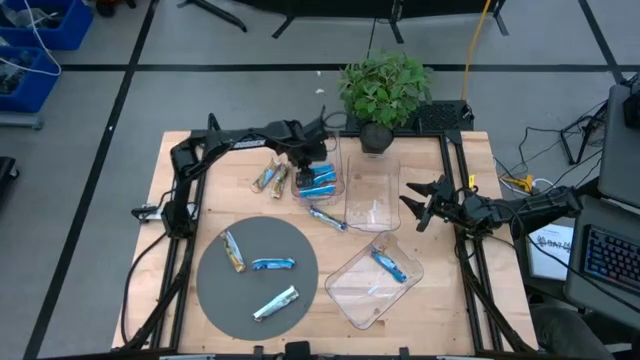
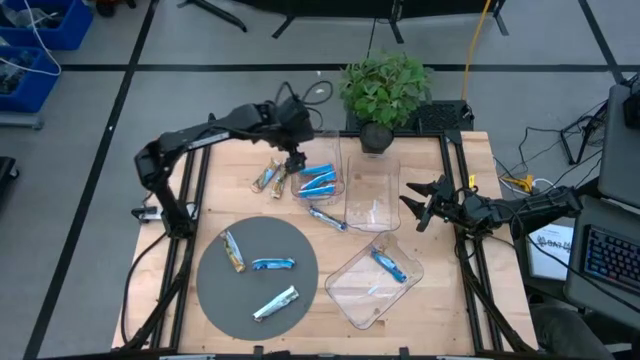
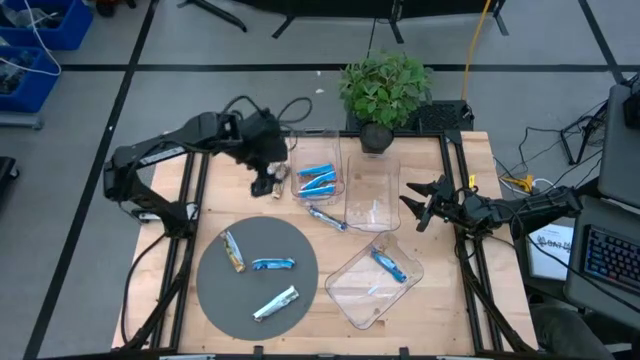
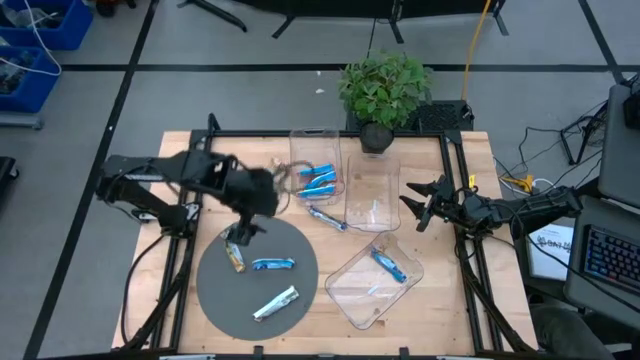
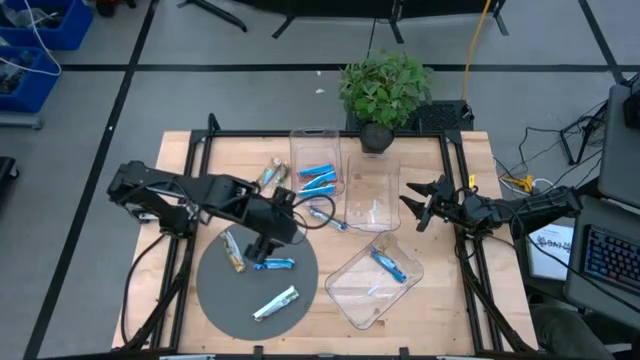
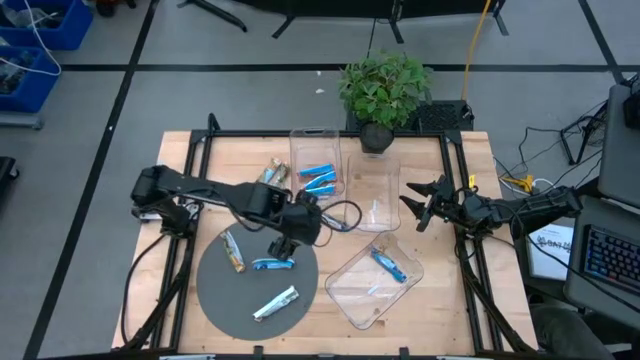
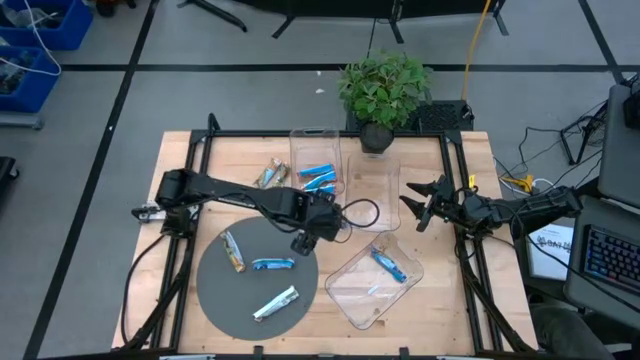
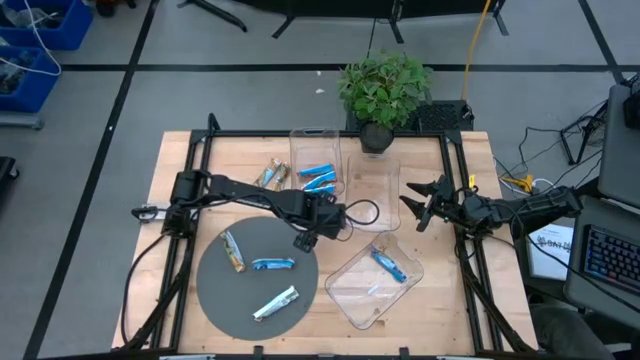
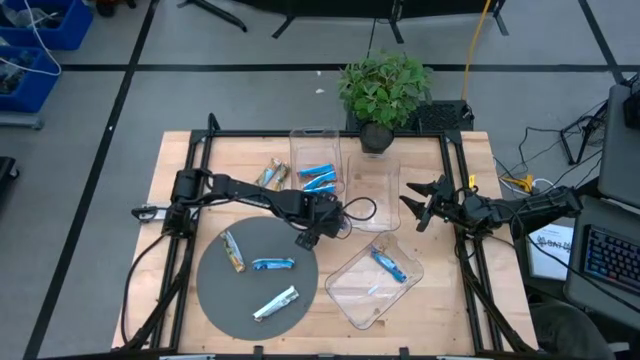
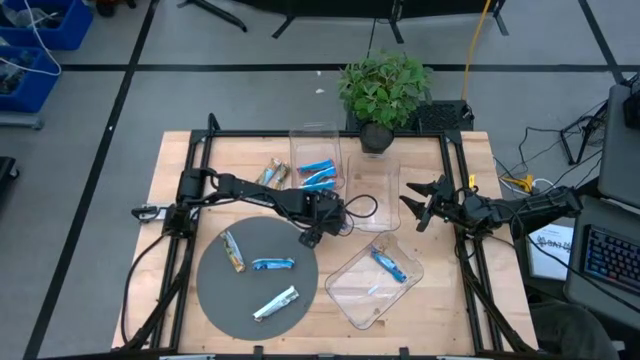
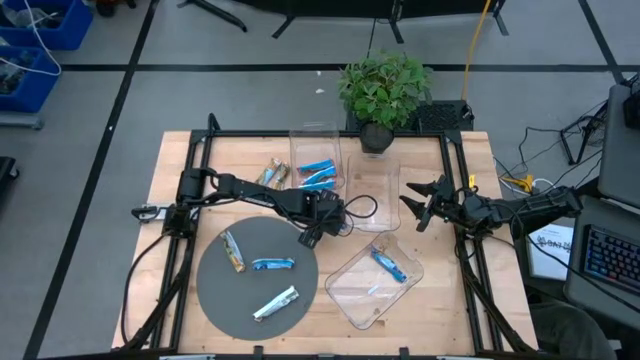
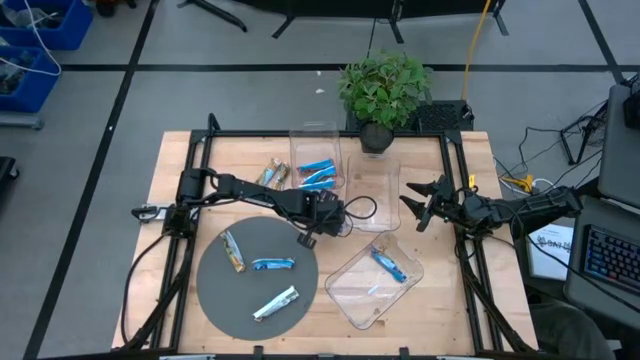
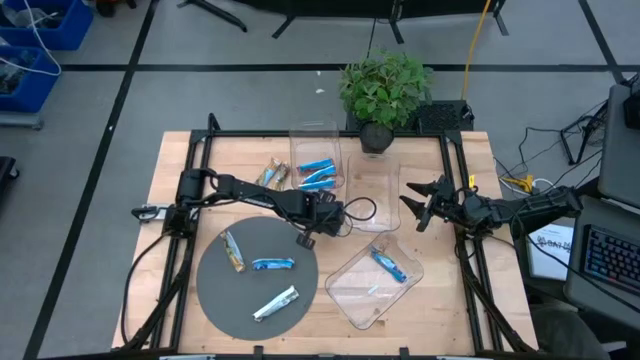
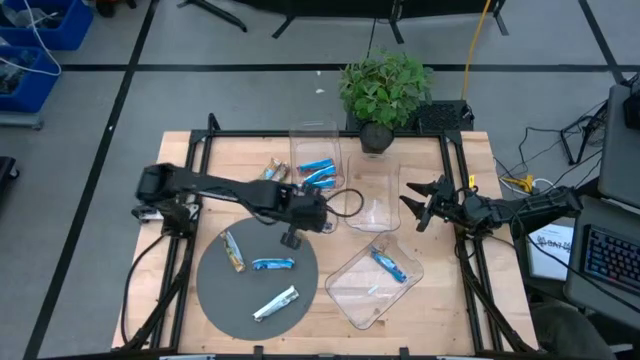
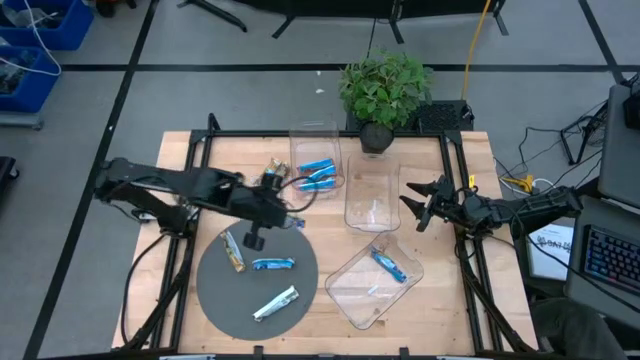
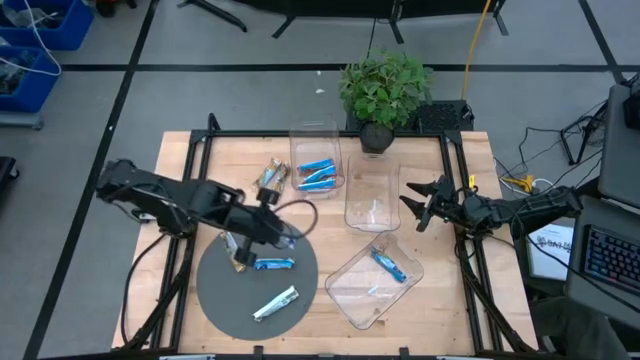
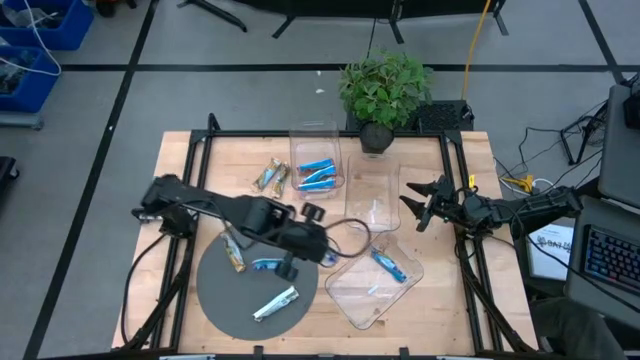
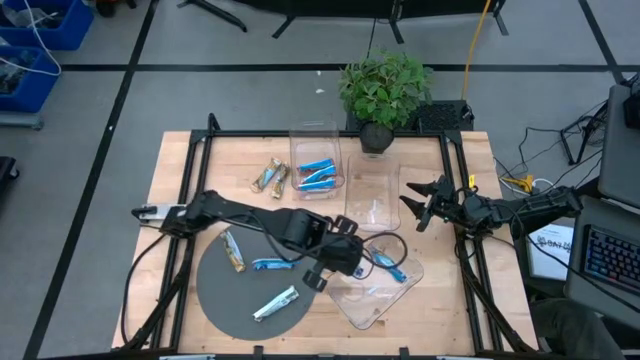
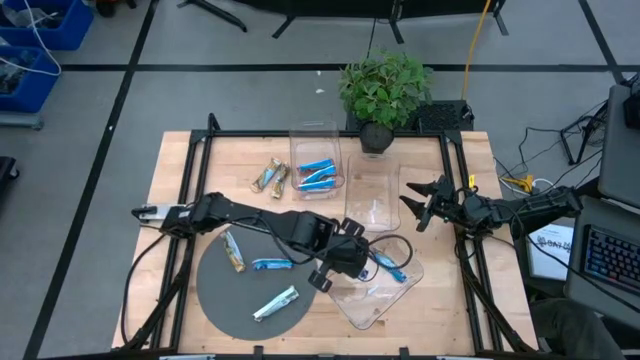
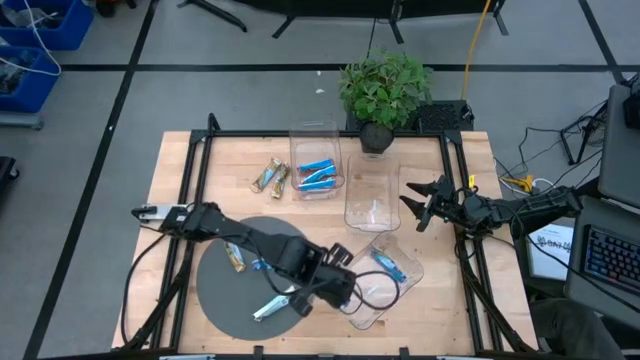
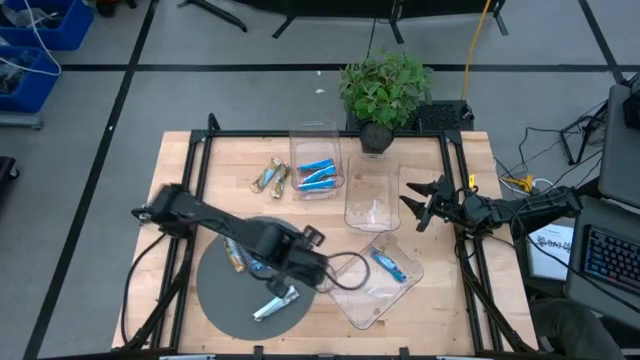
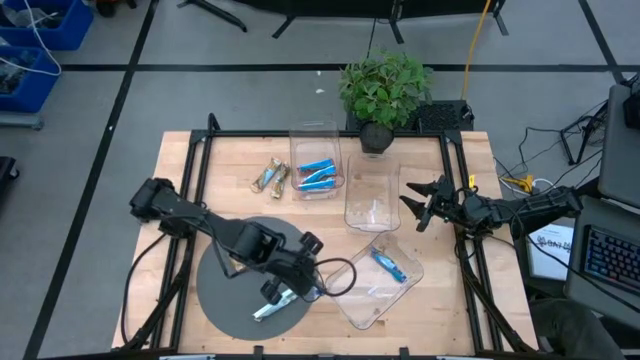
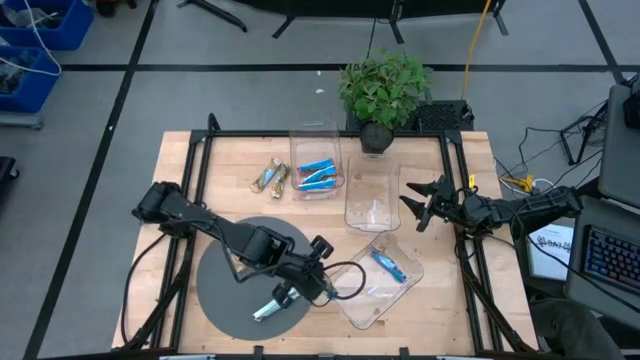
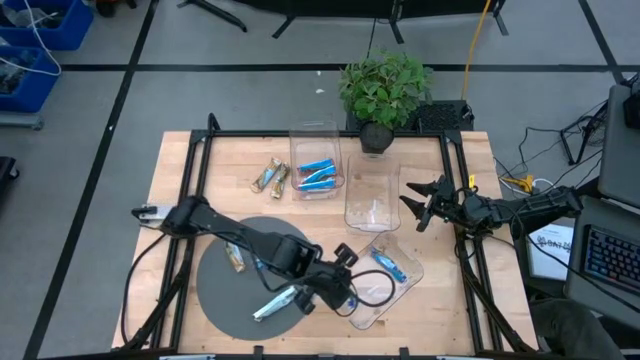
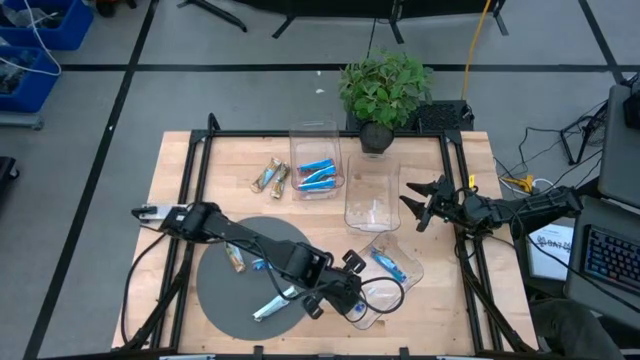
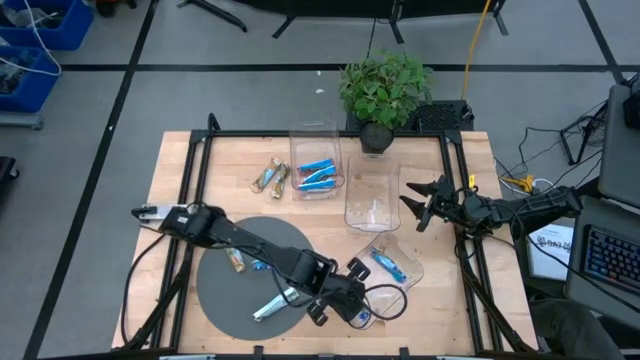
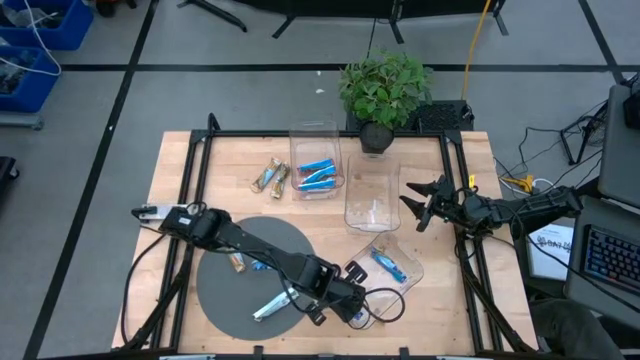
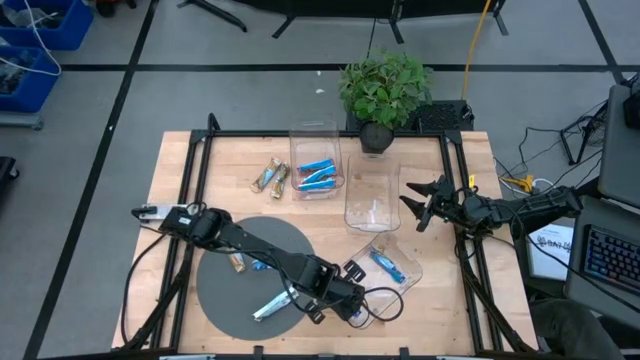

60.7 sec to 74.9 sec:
Task: Pick and place Granola Bars by type
Put the blue granola bar into the bottom transparent bin

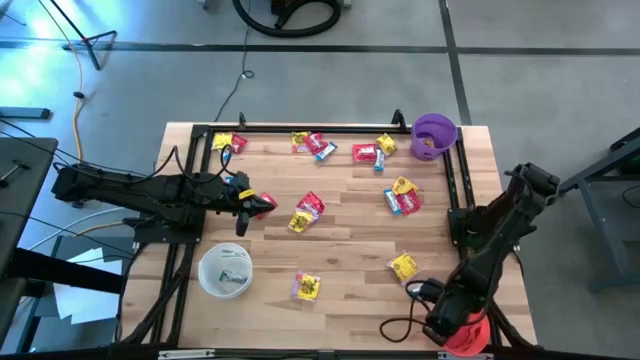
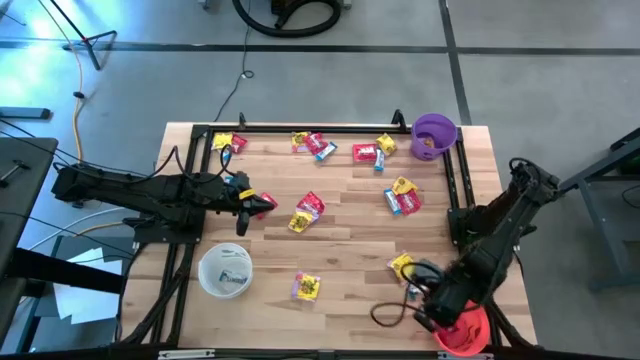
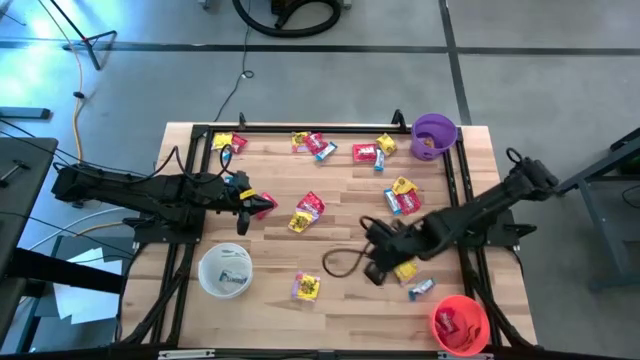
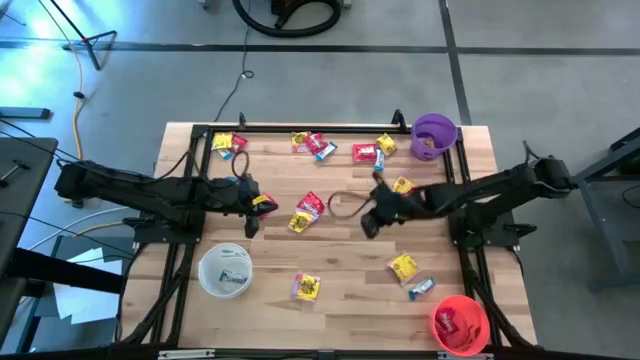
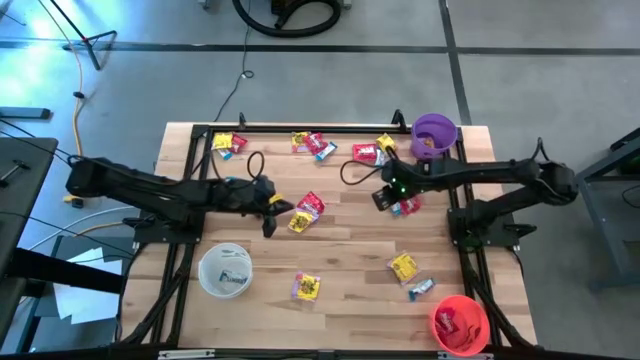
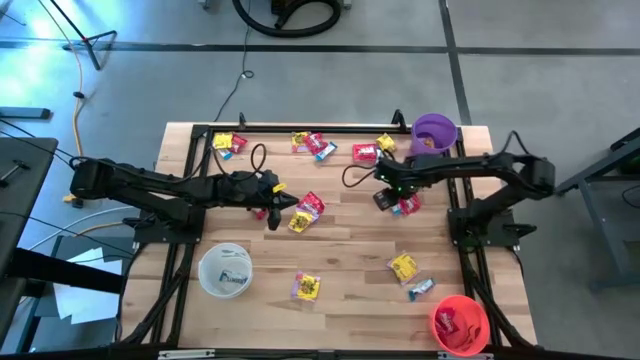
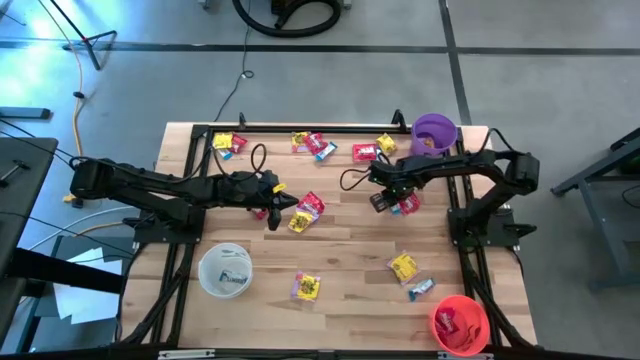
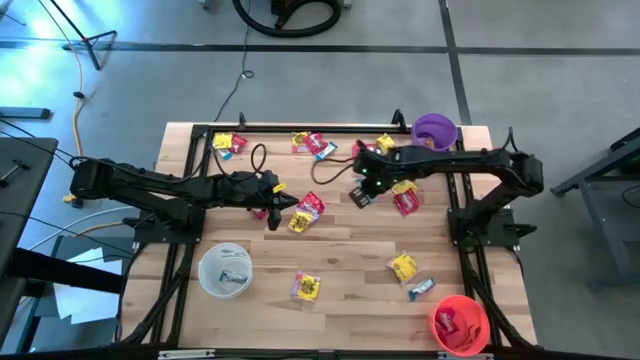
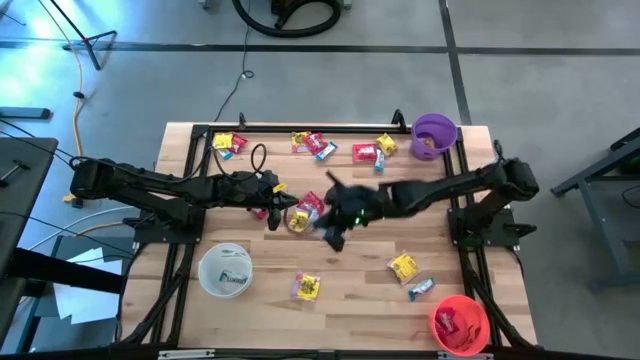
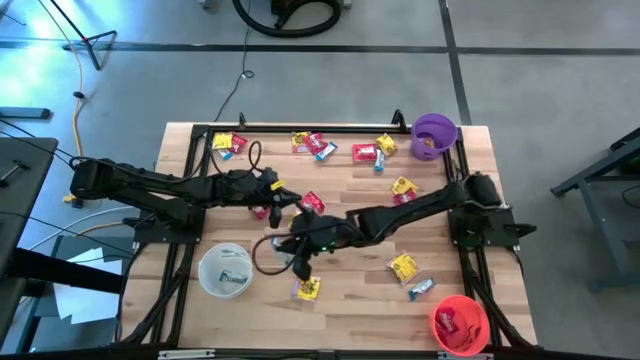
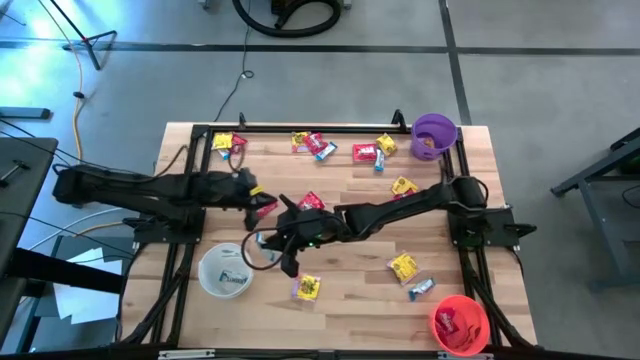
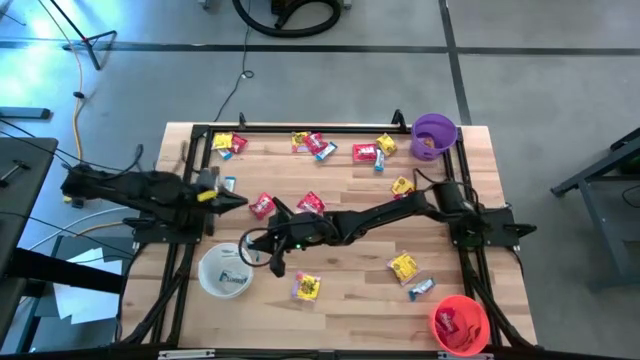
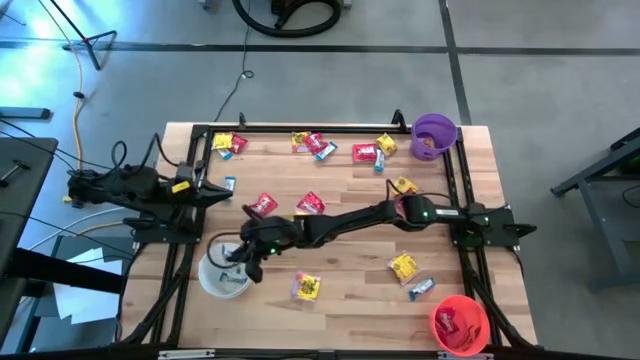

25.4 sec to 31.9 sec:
Task: Sort candy
Put the white chocolate bar into the white bin

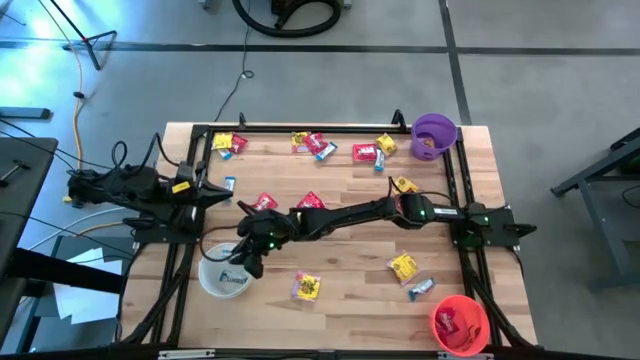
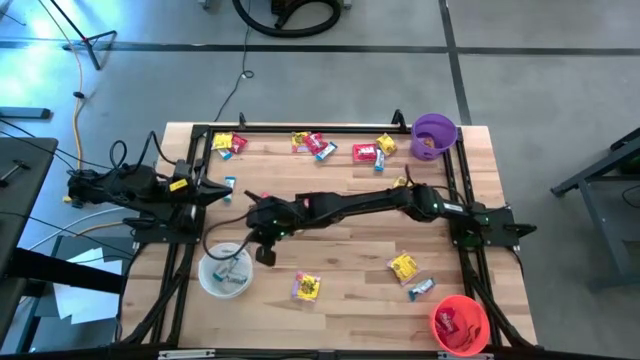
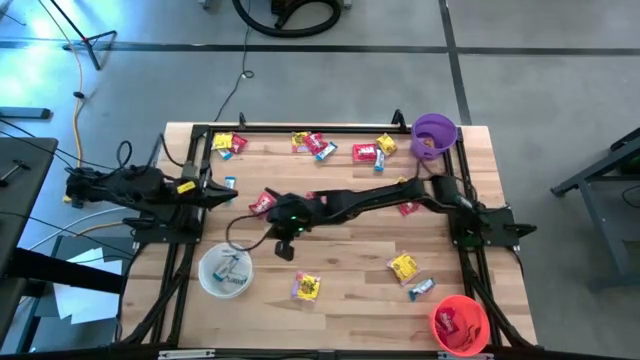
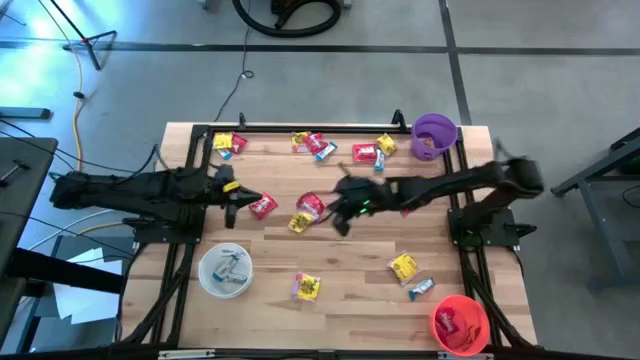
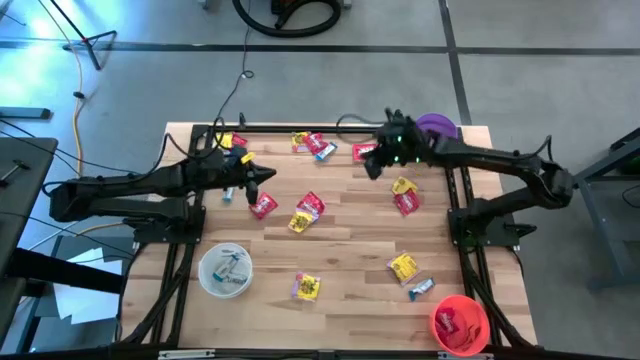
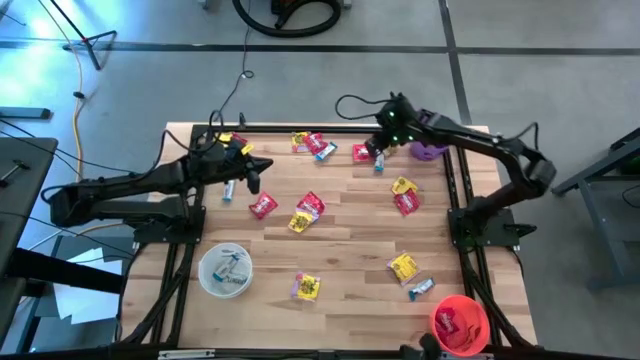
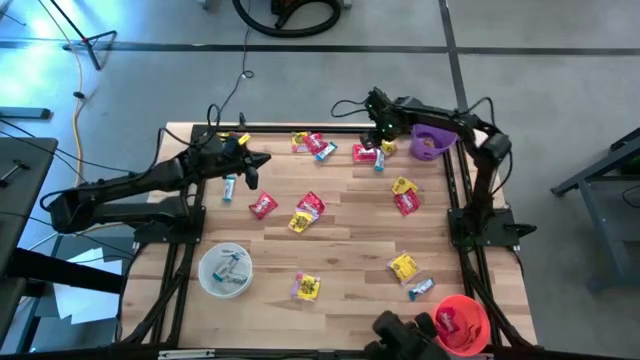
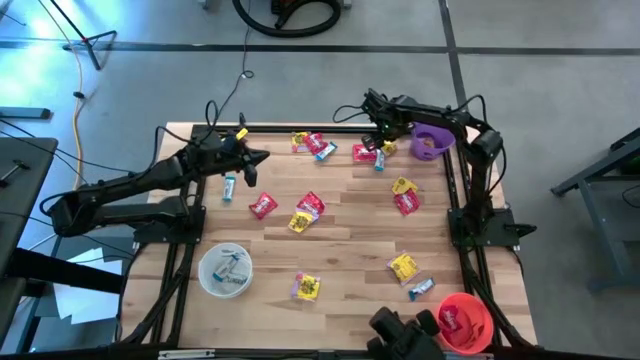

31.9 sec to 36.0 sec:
Put the yellow candy into the purple bin
